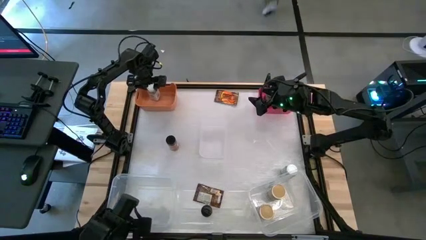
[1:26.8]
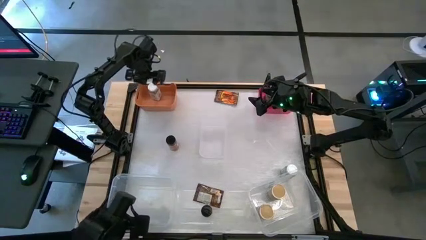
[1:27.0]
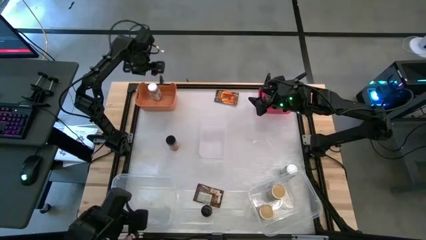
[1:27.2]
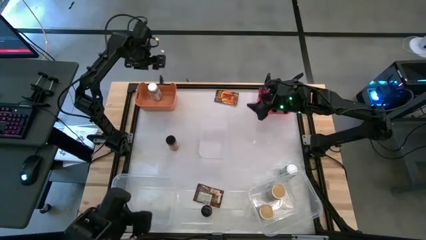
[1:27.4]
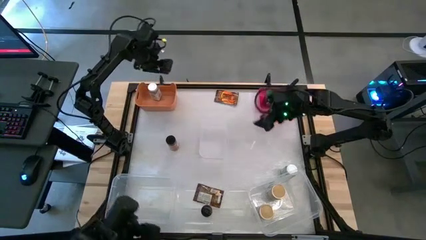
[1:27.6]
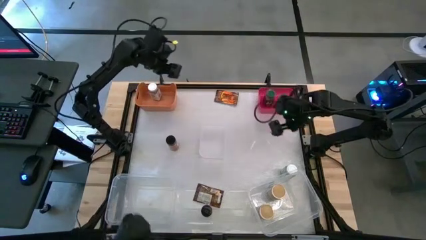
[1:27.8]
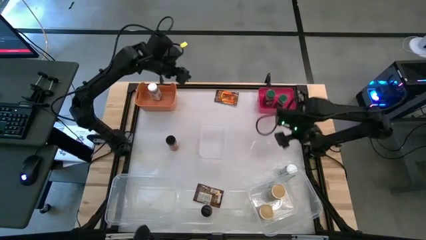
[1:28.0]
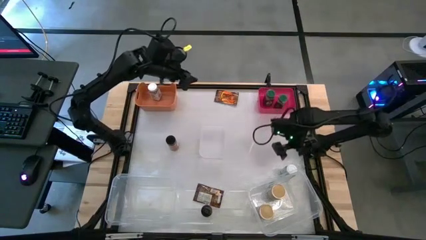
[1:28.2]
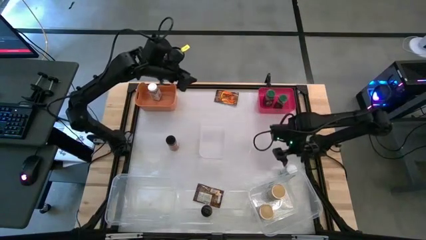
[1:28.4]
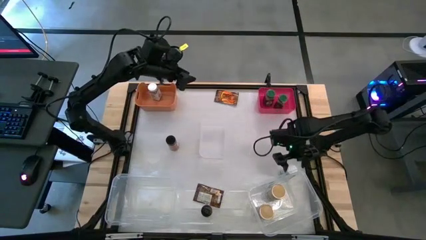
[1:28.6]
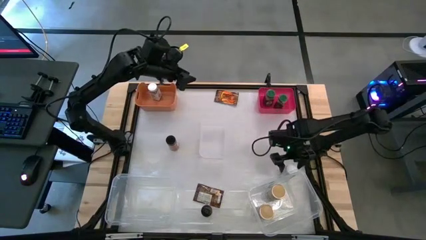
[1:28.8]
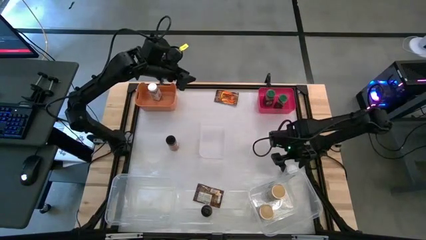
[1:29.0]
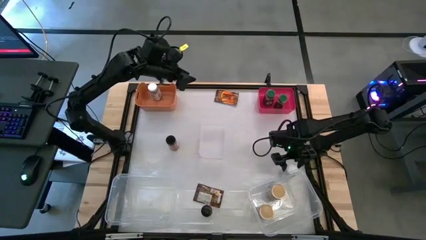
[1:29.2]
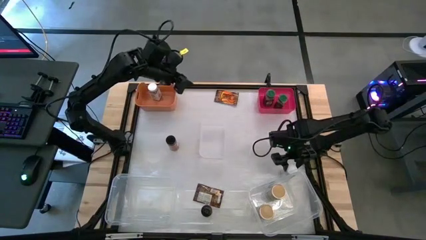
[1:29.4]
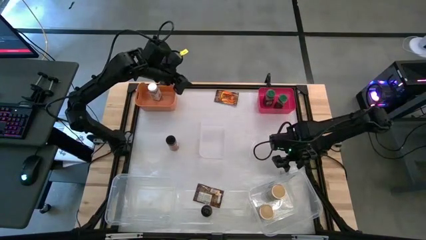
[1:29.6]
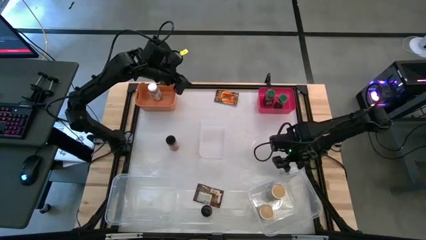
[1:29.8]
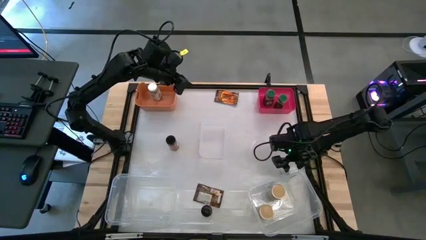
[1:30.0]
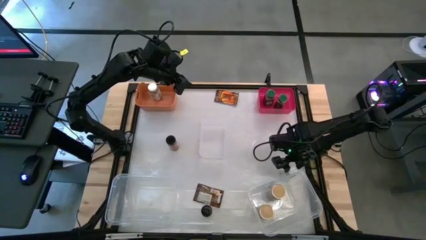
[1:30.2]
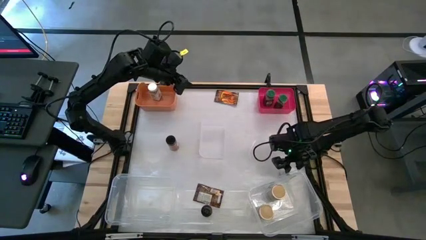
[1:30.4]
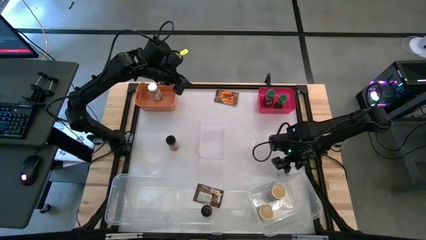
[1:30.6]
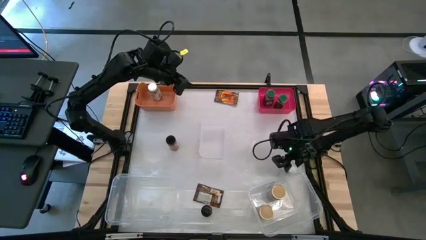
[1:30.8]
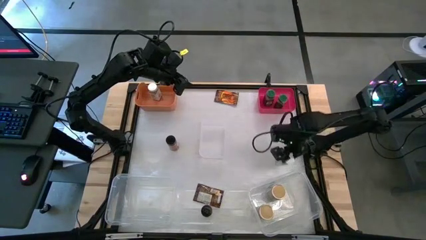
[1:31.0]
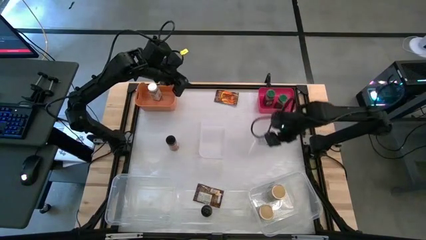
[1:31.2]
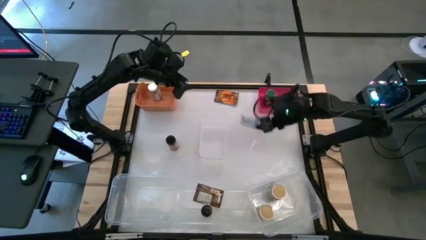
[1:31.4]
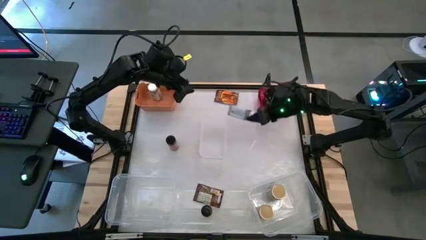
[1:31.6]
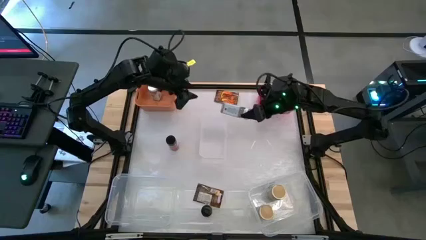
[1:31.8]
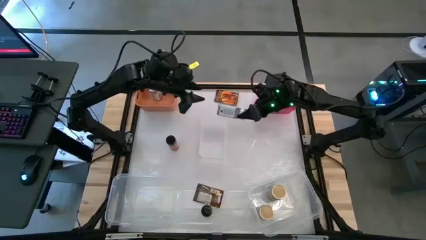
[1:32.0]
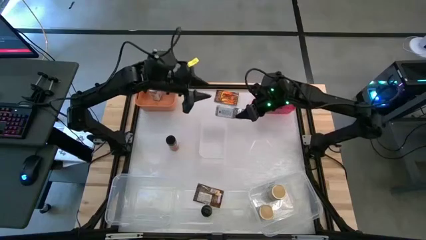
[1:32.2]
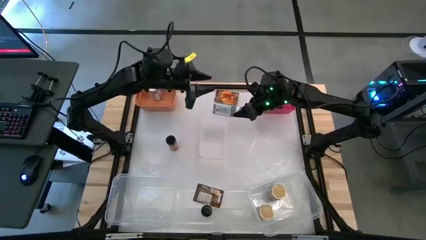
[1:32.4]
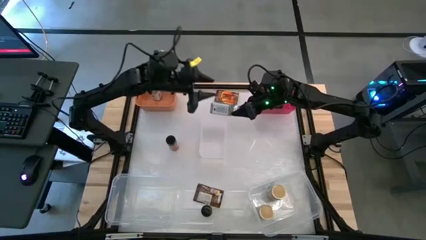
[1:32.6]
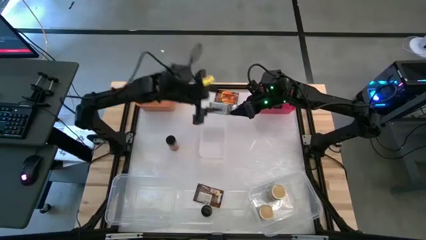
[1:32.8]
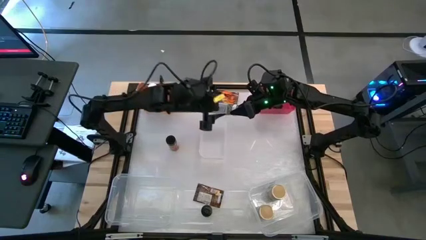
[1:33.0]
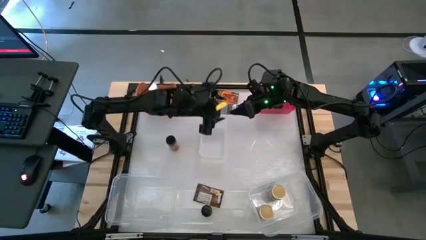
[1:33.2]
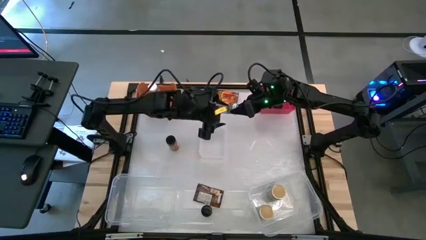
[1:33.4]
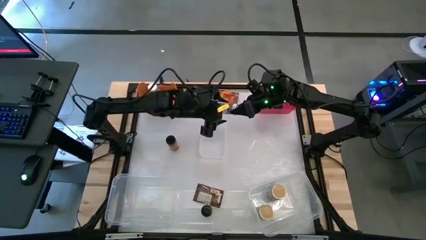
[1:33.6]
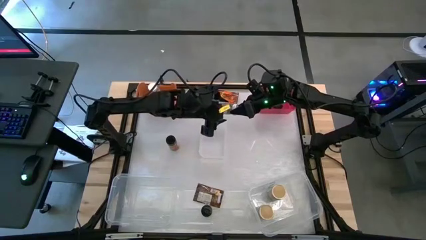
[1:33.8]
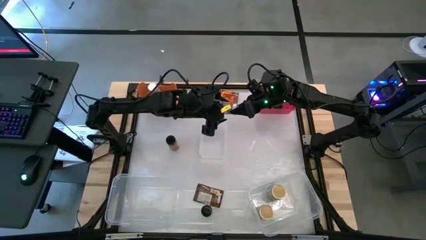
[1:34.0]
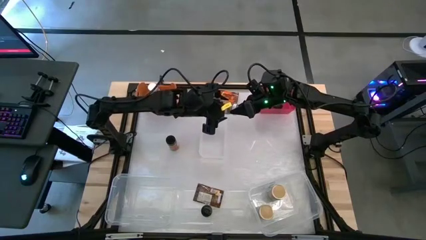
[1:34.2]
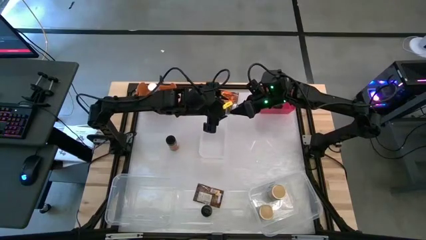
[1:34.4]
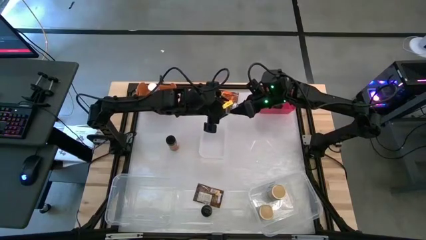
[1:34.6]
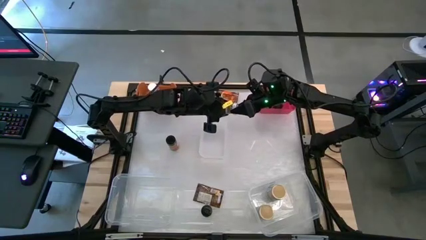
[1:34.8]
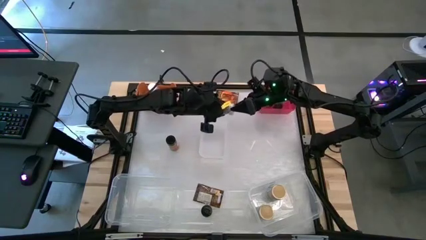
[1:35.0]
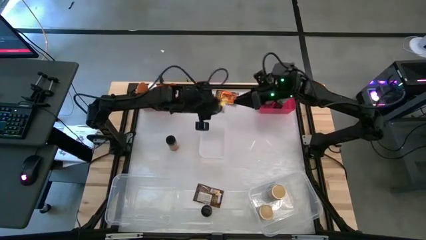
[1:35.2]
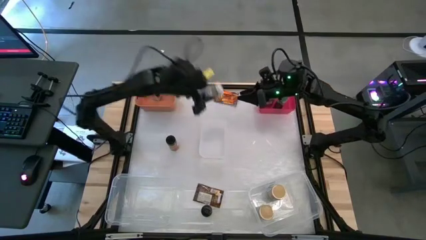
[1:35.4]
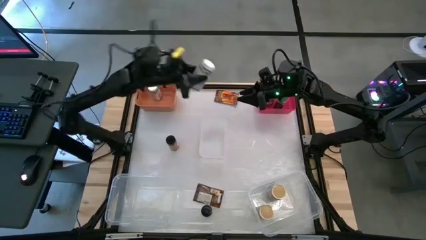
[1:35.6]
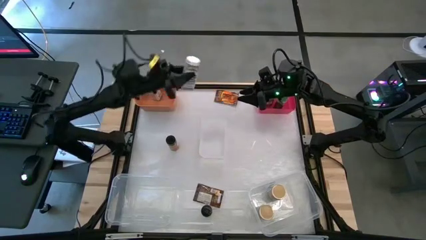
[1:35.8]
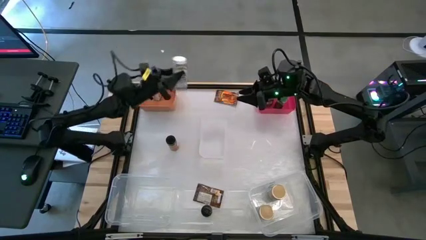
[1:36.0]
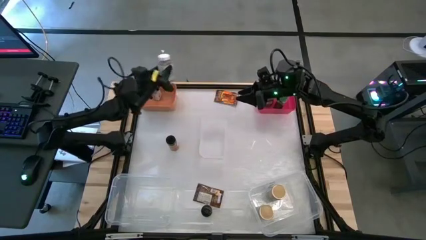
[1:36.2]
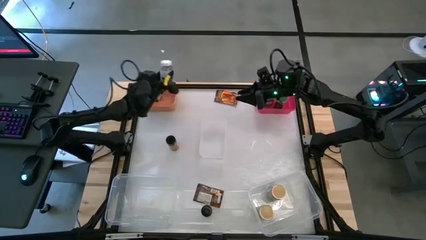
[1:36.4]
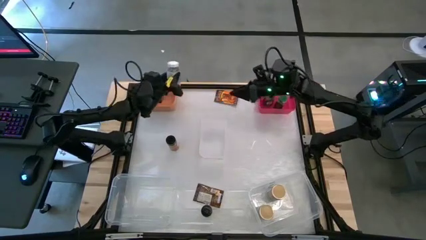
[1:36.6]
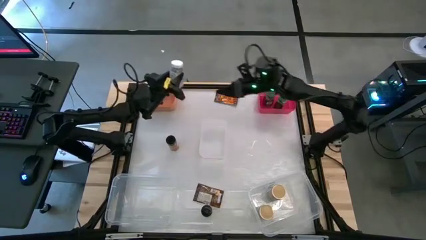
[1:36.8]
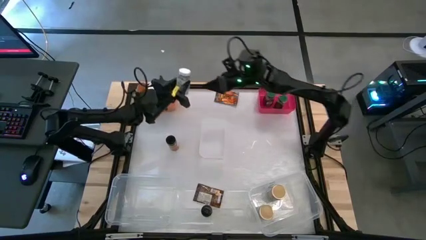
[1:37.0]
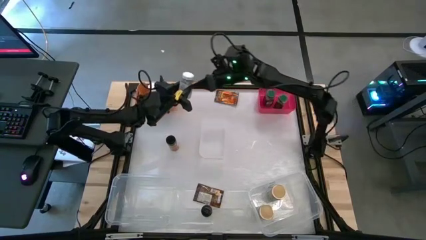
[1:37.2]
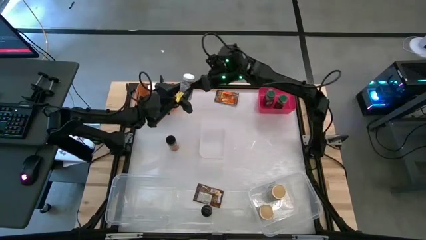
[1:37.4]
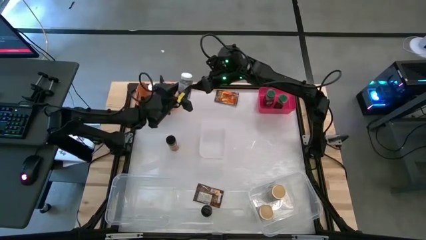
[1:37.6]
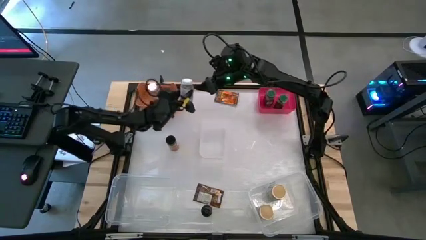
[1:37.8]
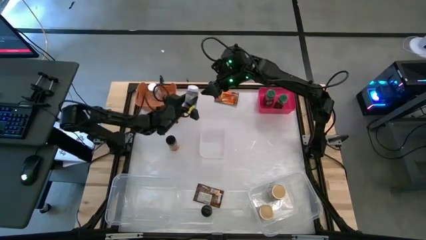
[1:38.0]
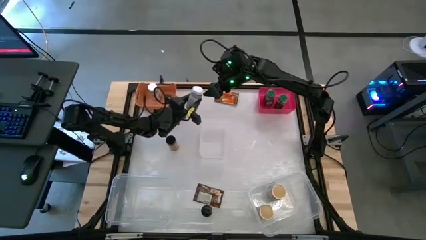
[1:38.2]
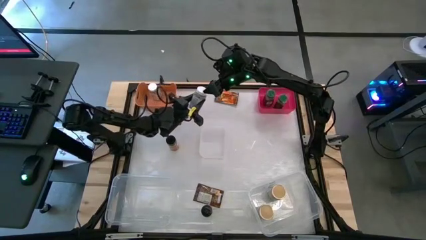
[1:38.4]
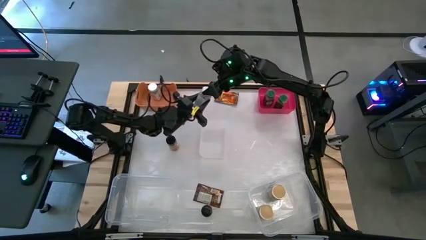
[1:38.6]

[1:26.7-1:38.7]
Task: Sort spices by type
Put the white seasoning bottle into the orange bin

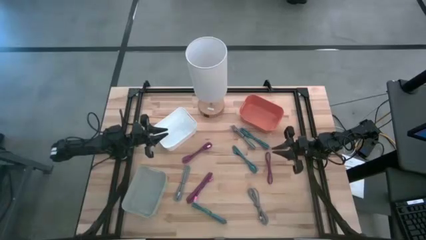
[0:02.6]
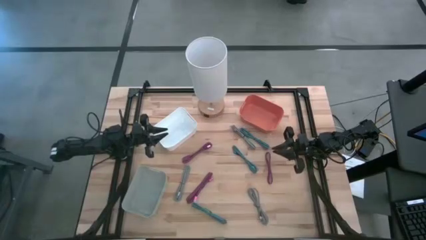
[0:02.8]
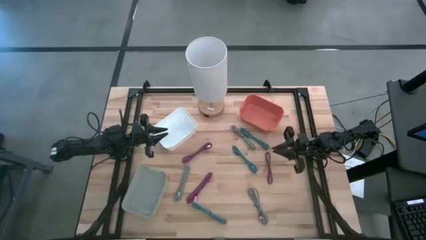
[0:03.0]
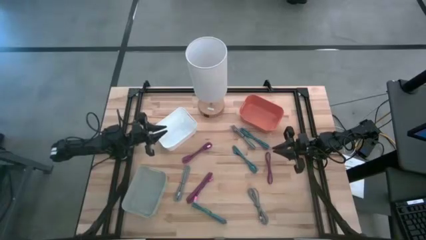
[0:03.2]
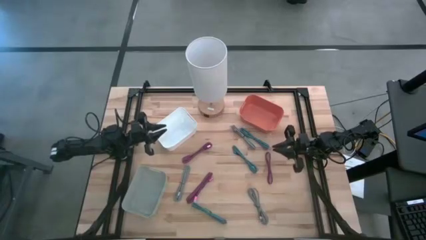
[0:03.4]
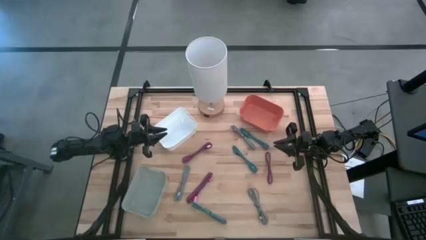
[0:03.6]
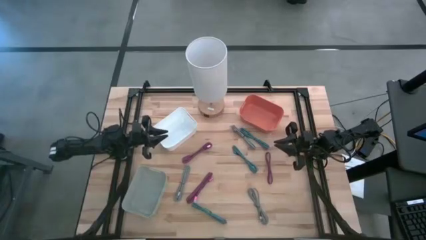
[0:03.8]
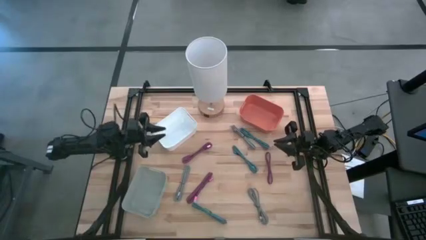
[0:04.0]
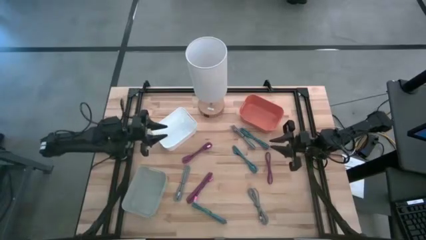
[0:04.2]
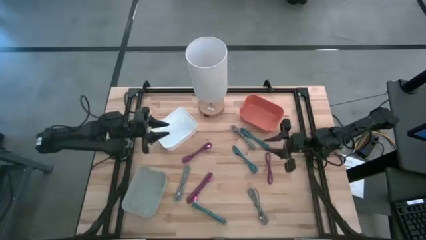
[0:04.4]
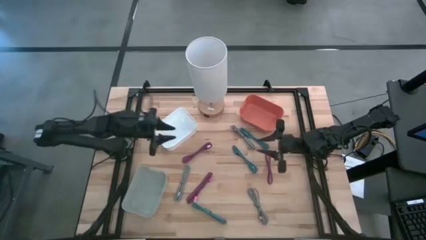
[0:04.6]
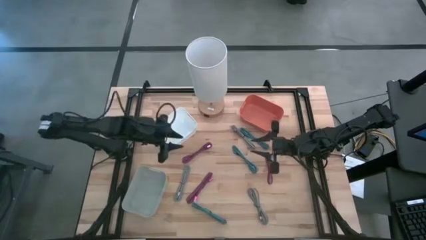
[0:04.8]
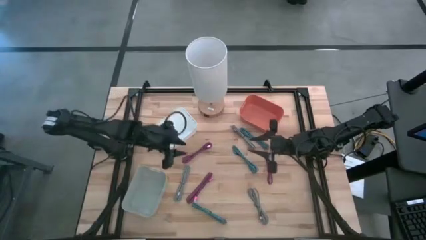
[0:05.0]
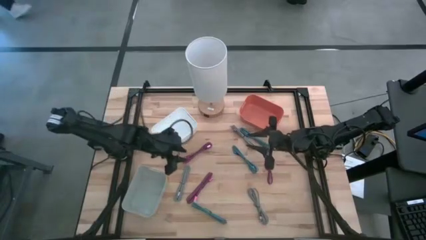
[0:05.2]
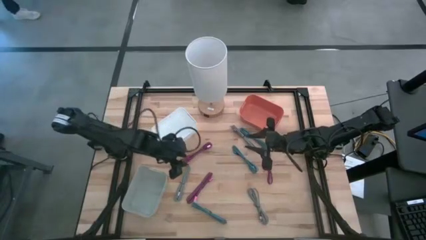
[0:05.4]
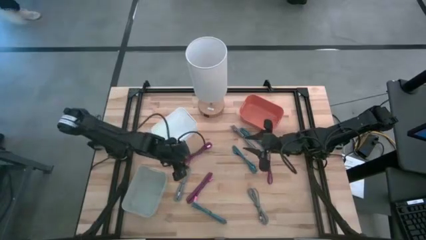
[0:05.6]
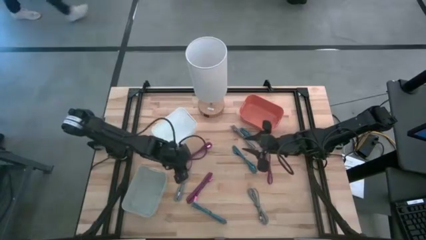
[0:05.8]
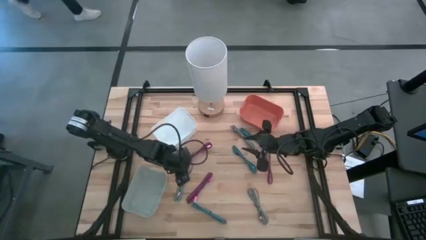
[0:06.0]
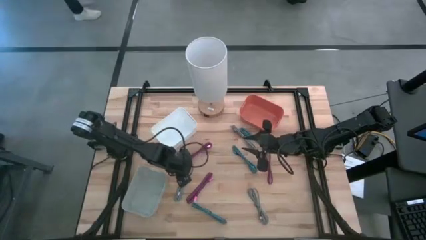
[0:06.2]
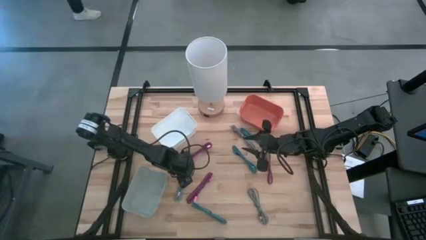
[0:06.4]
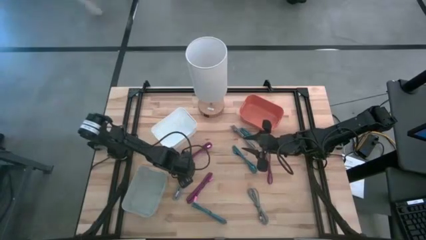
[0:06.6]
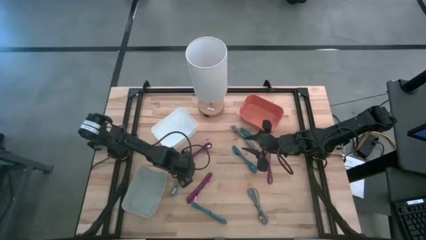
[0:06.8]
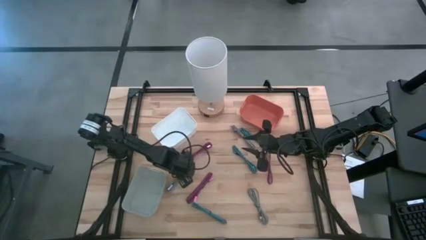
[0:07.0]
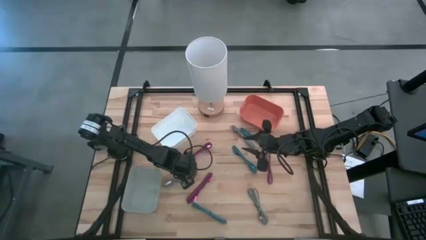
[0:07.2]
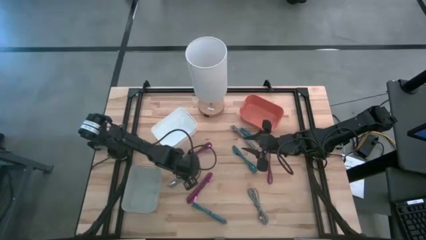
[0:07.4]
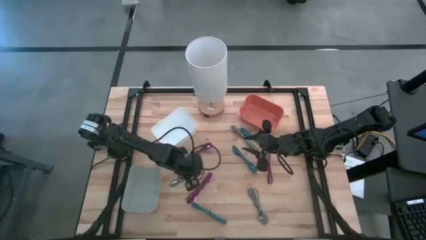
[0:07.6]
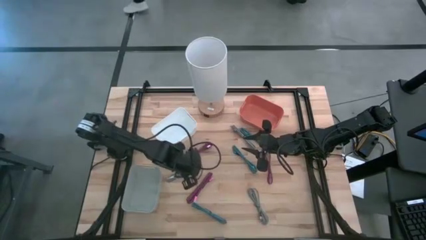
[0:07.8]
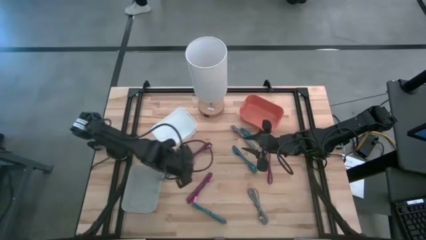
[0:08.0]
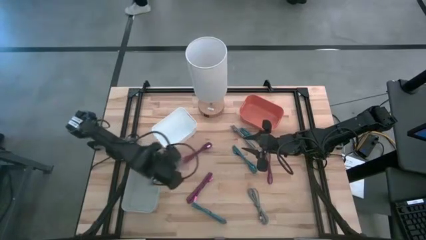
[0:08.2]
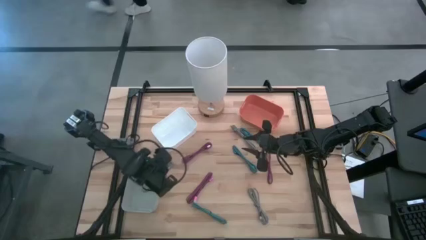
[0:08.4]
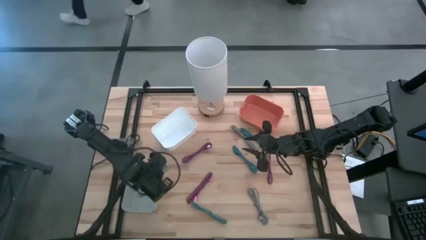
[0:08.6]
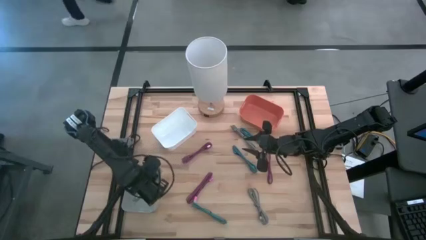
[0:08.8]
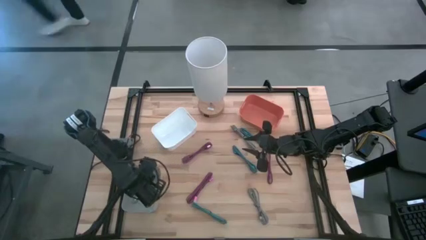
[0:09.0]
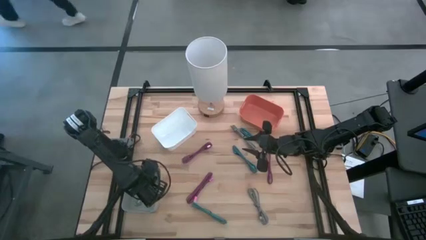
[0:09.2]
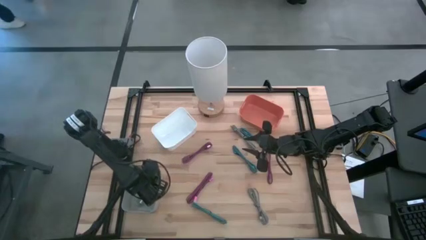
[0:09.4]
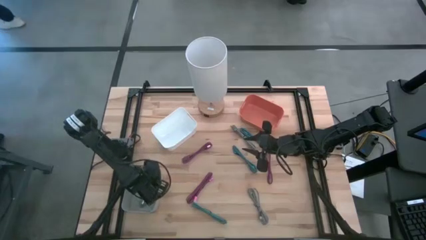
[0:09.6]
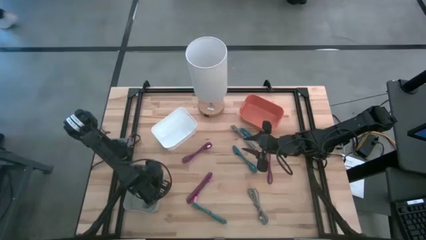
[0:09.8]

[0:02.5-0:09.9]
Task: Pick & Place USB Port
Put the left white and black charger cable into the gray bin
